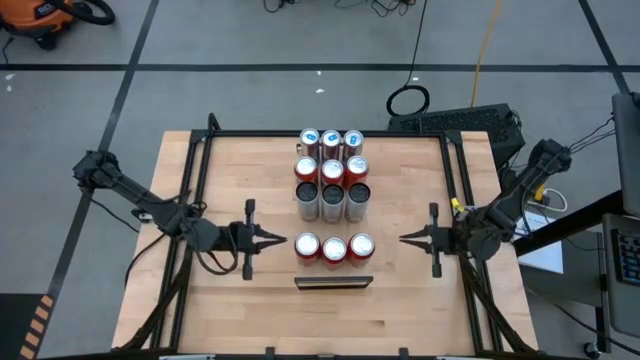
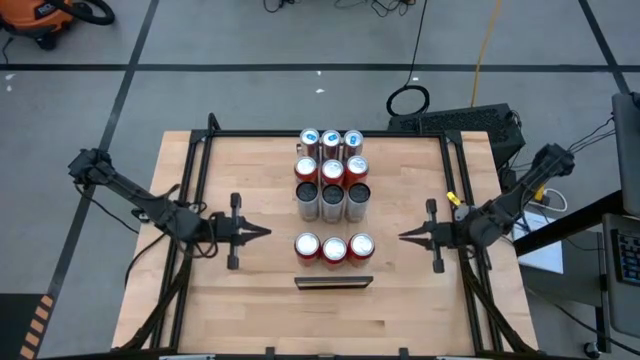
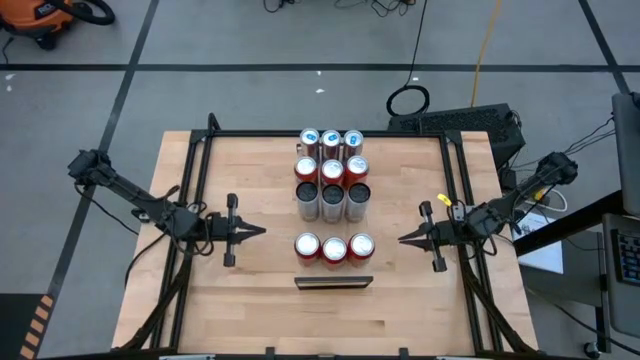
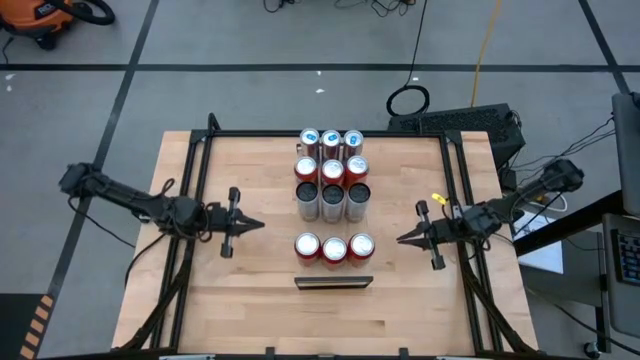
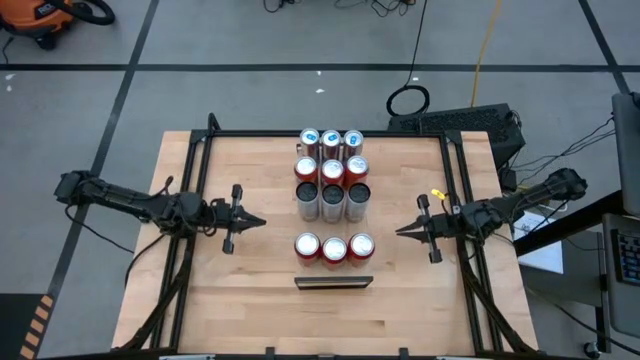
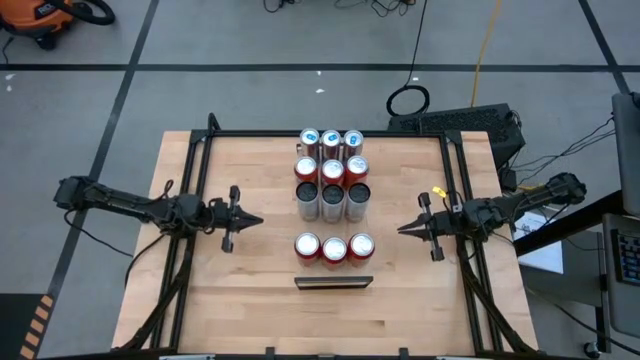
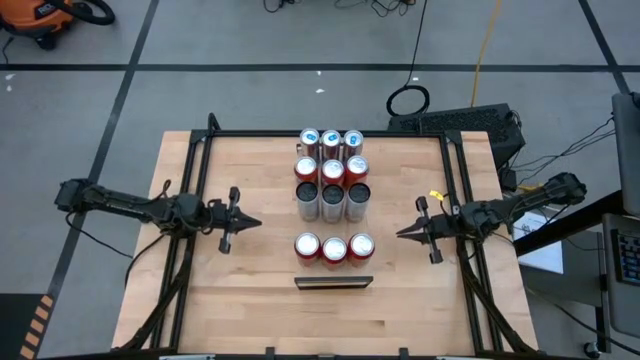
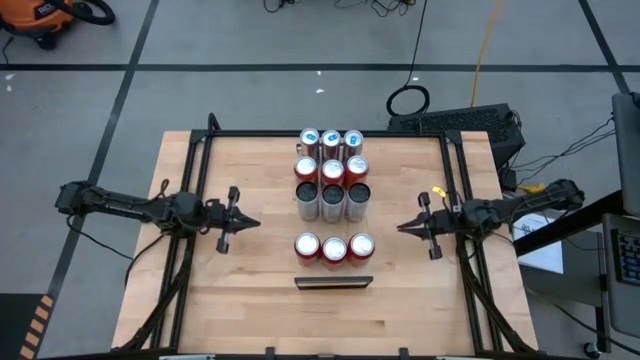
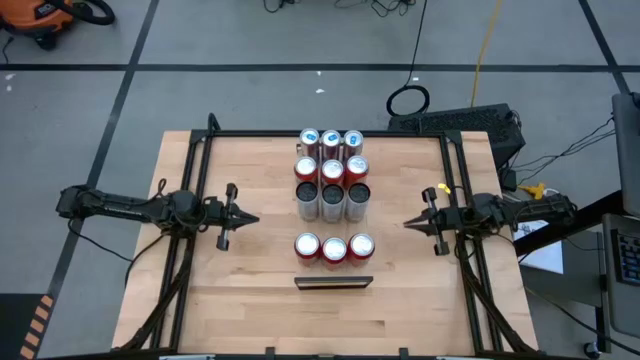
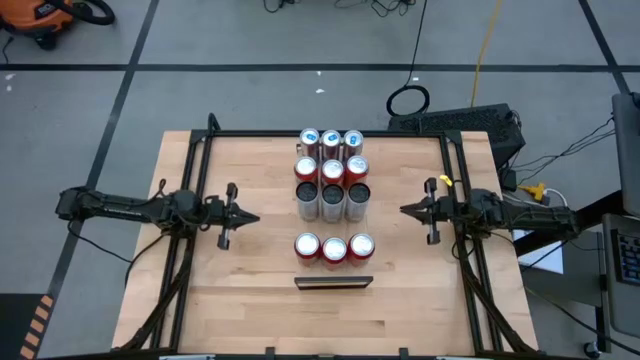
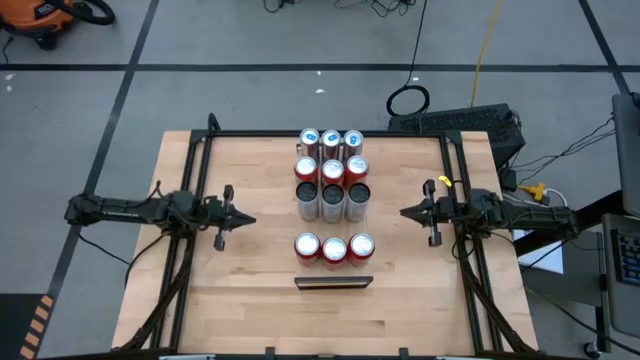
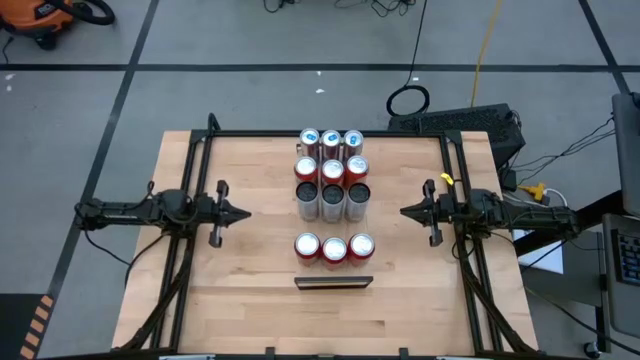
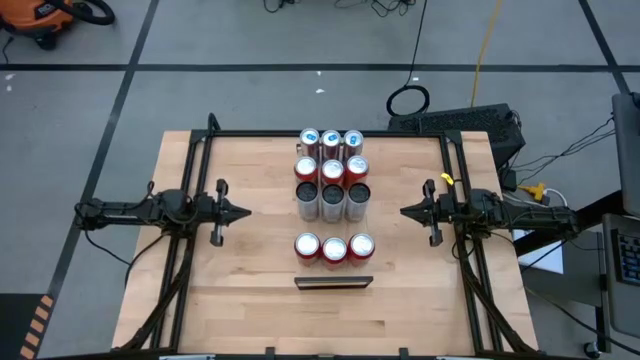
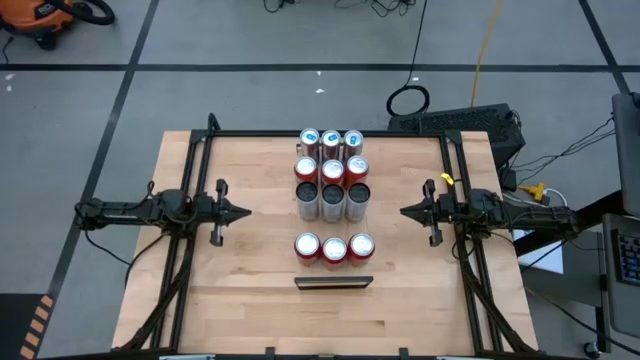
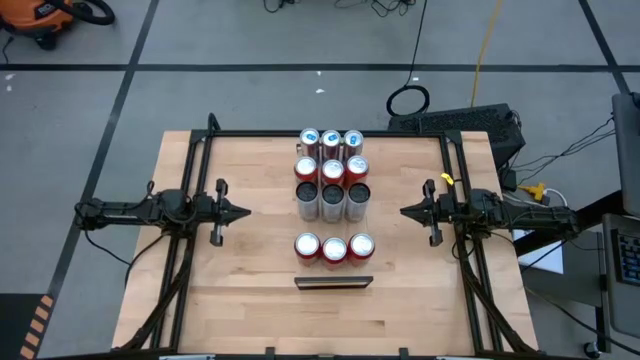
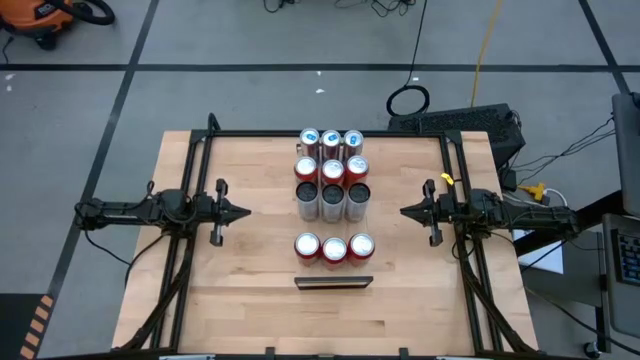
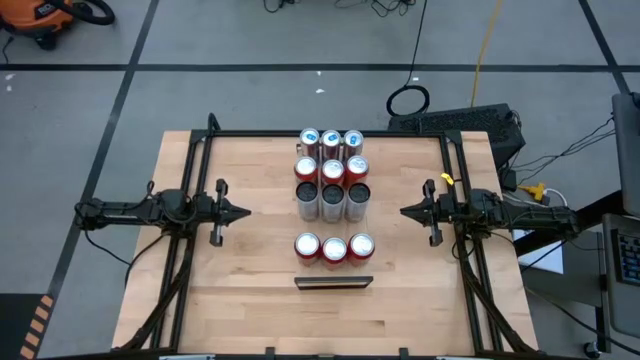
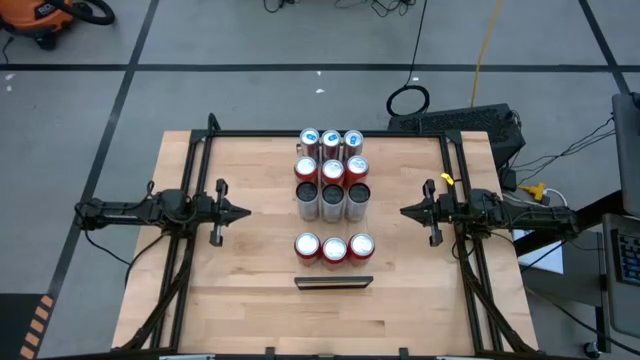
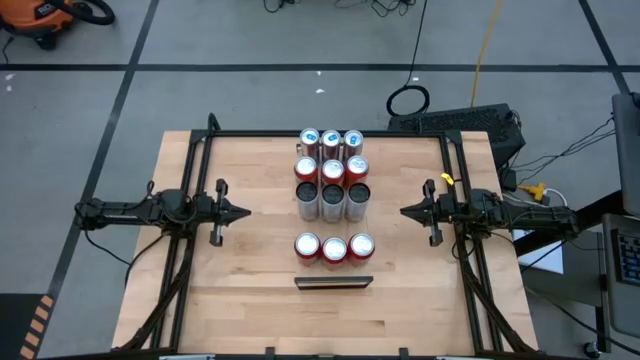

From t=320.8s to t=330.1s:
Task: Place canned beverage on shelf
Return to Home Position

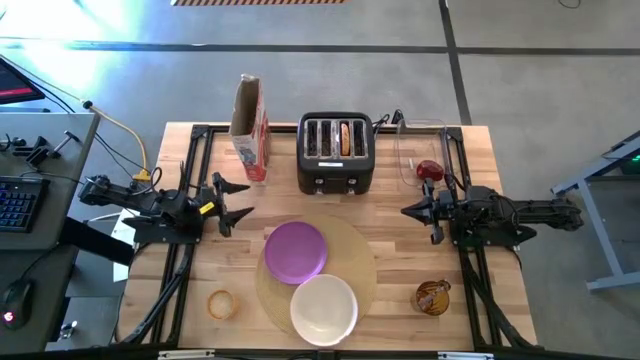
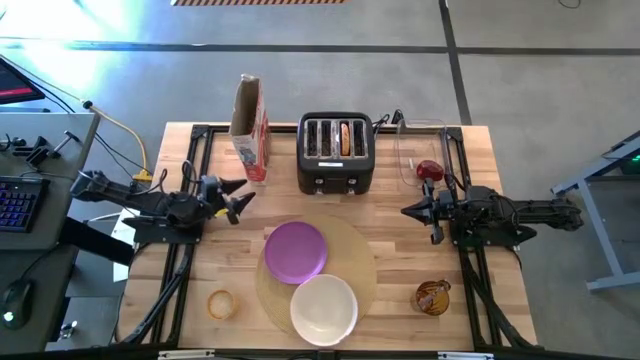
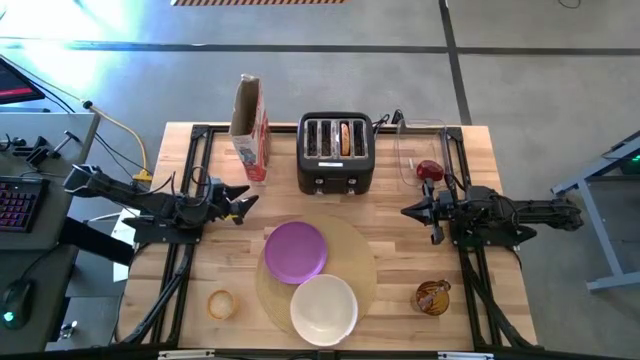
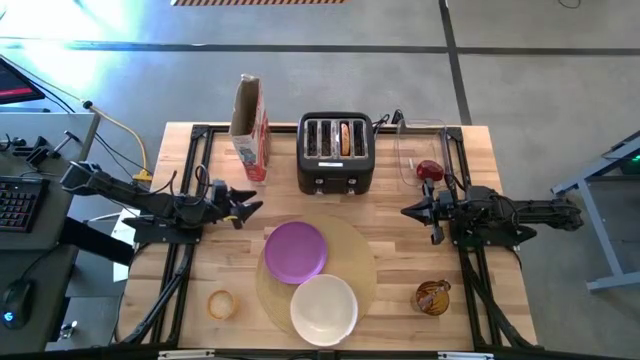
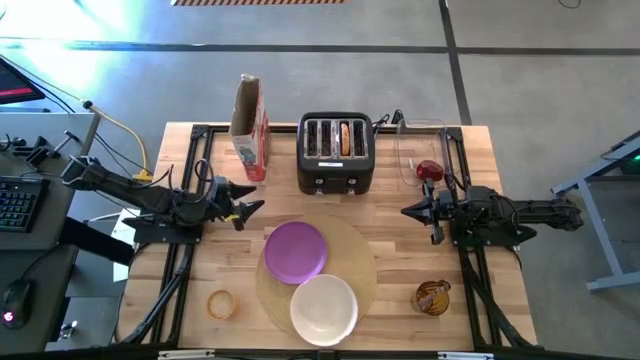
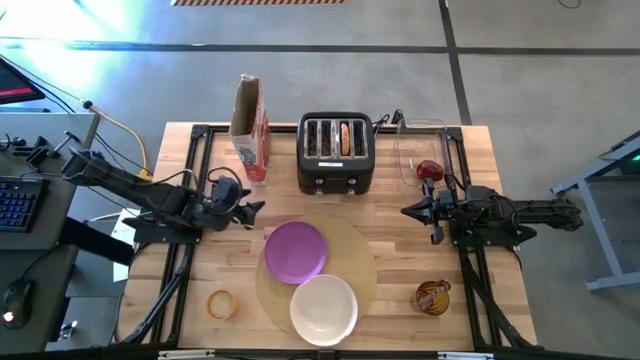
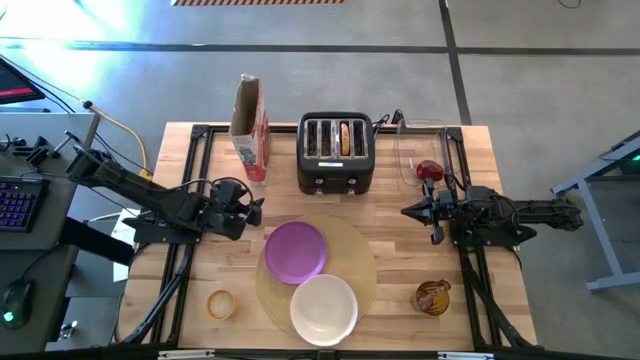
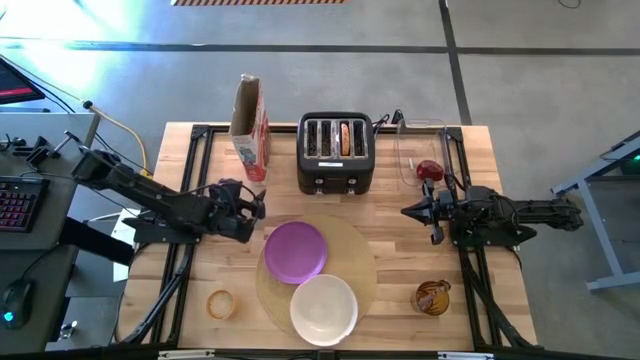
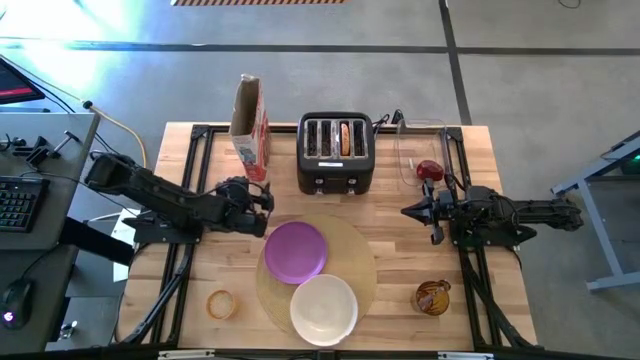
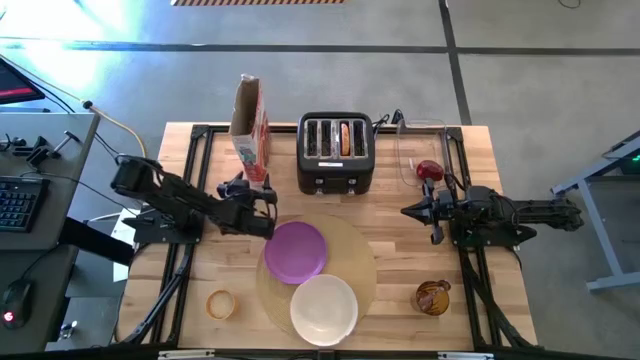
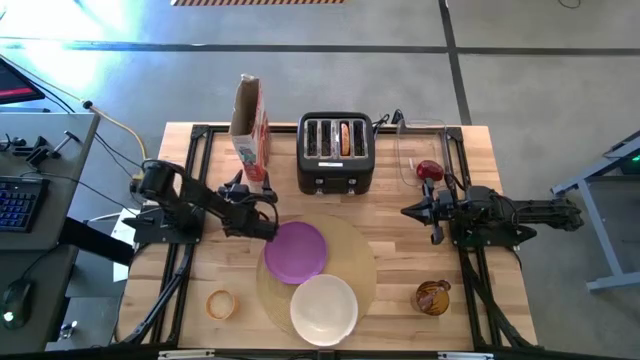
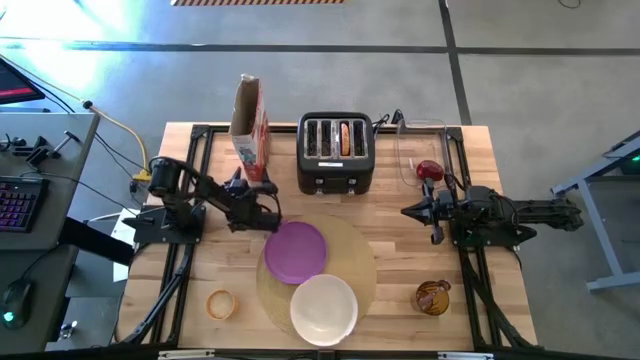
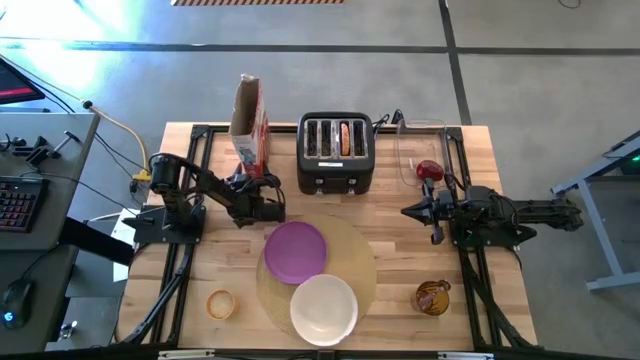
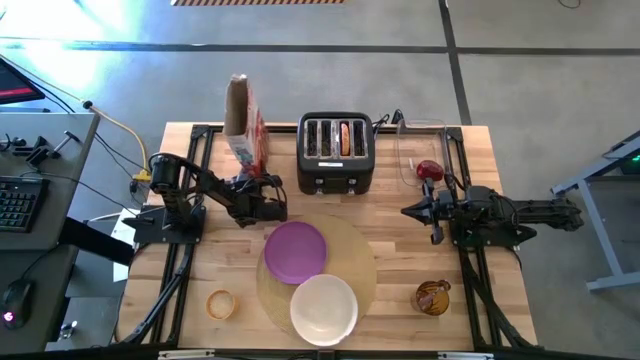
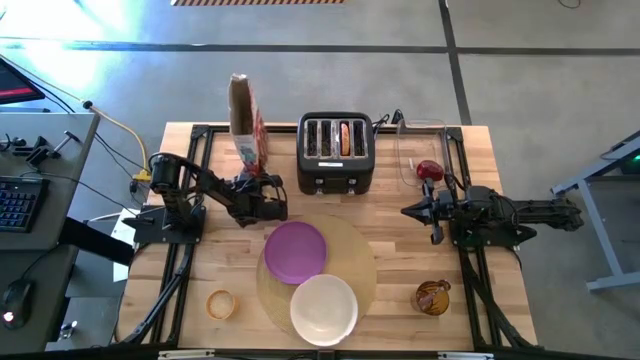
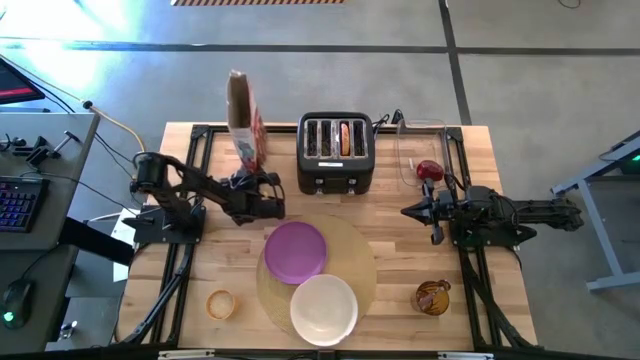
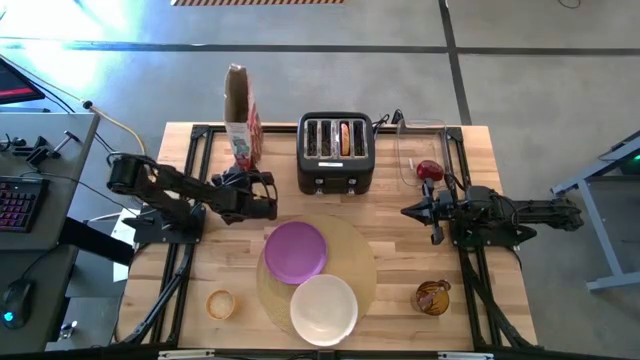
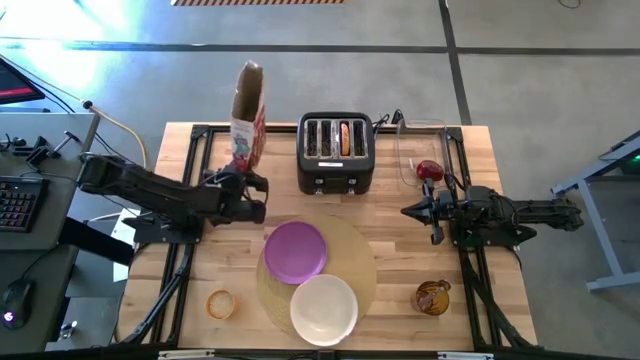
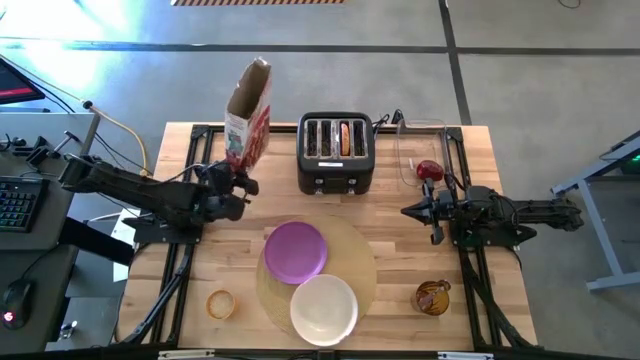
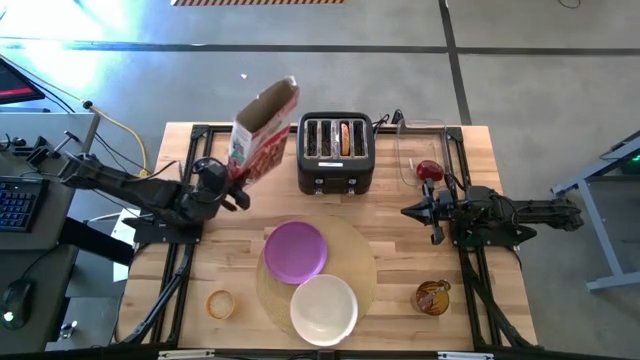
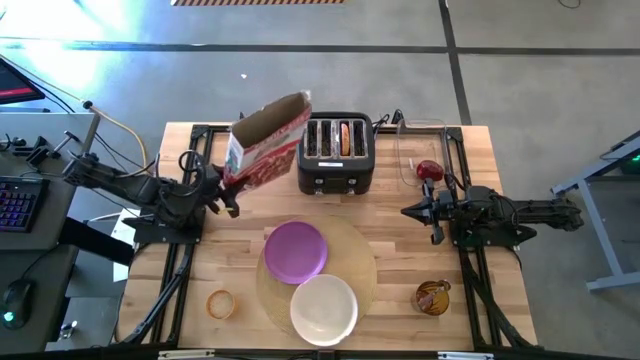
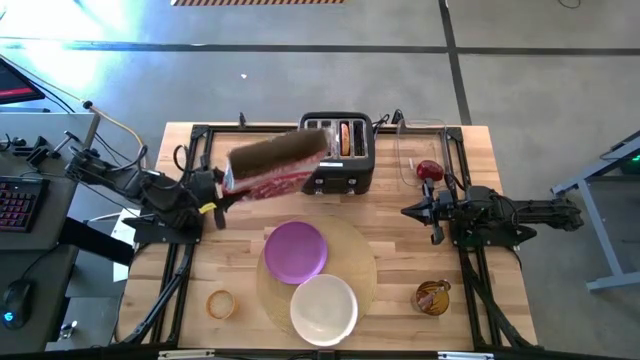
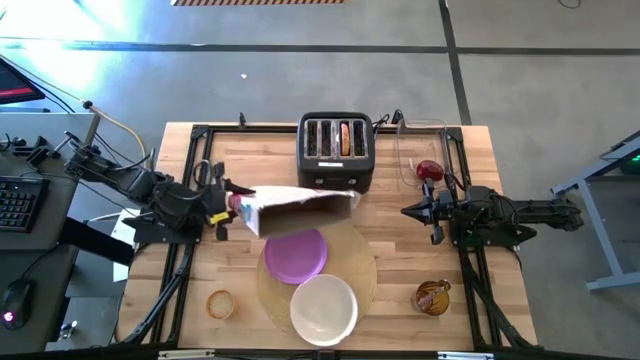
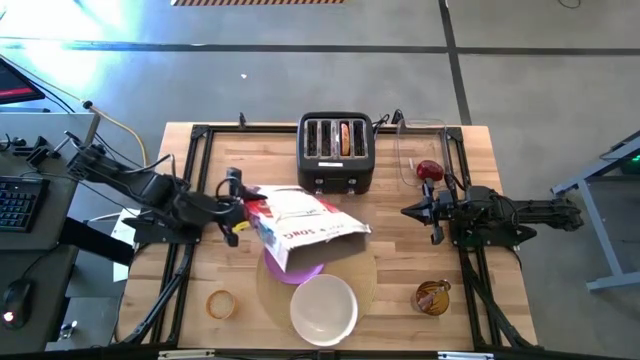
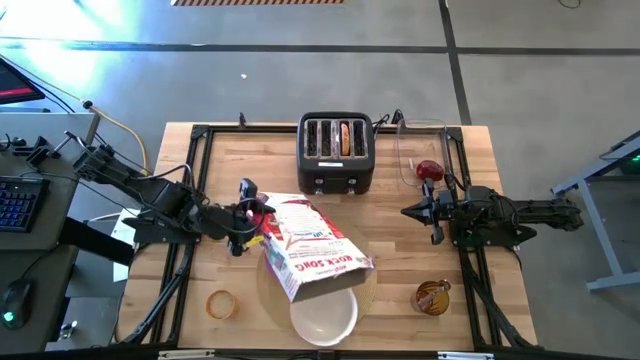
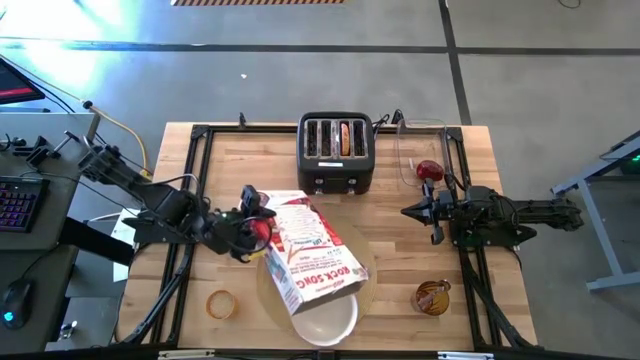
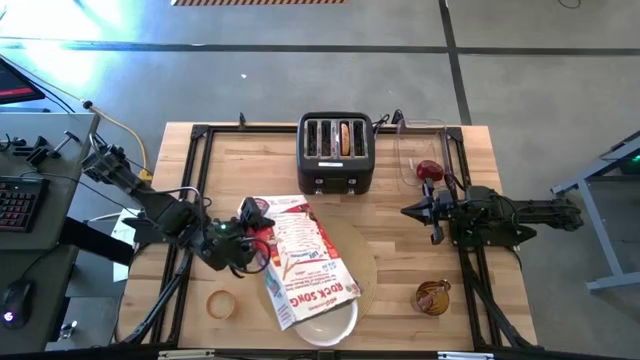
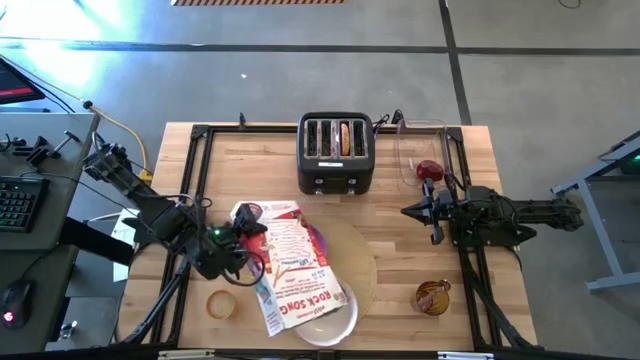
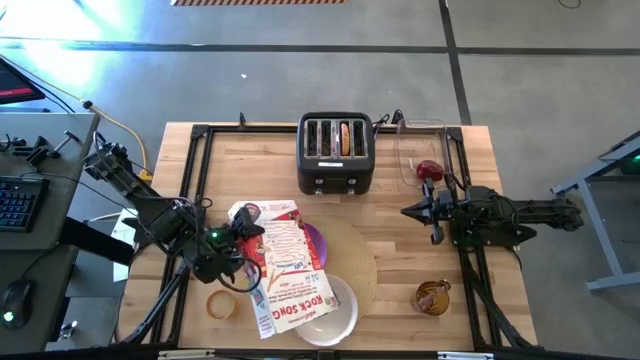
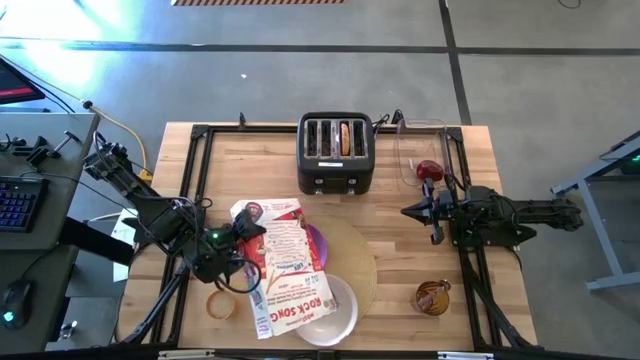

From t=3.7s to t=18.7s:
Task: Arrange a breakfast setting
Pour the cereal from the white cereal box into the white bowl
